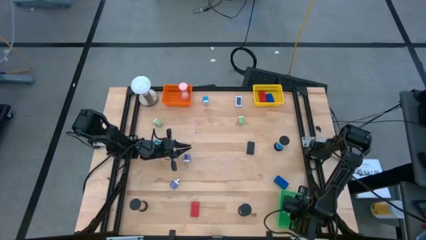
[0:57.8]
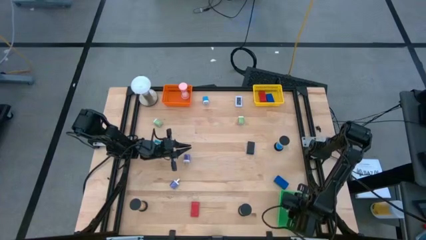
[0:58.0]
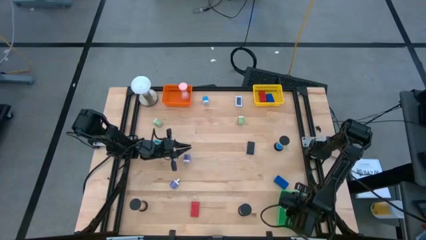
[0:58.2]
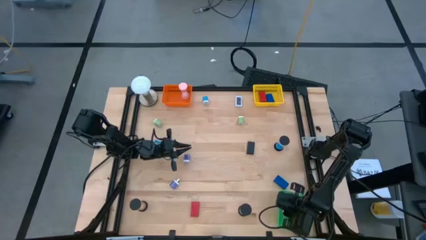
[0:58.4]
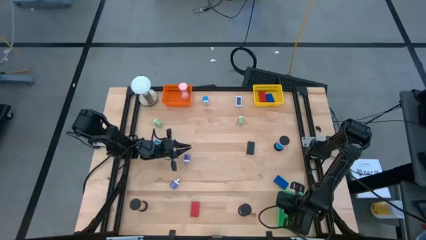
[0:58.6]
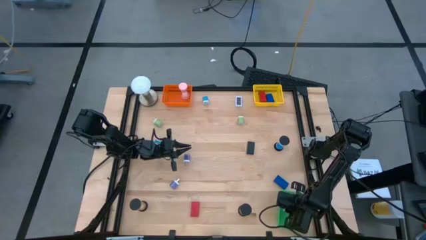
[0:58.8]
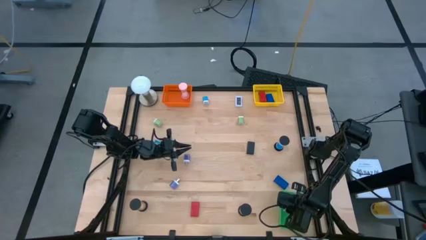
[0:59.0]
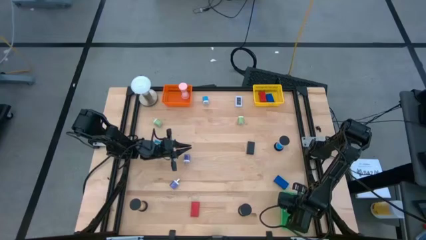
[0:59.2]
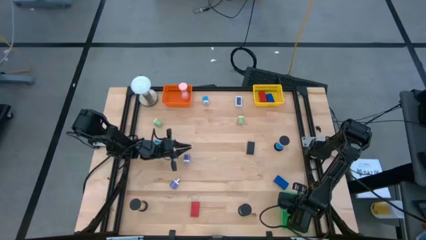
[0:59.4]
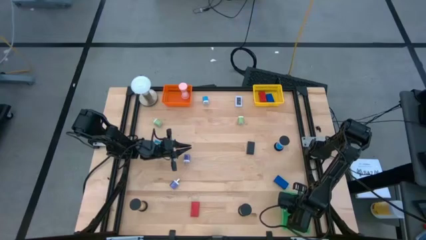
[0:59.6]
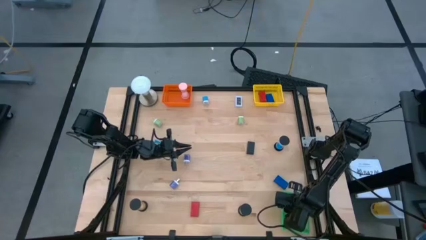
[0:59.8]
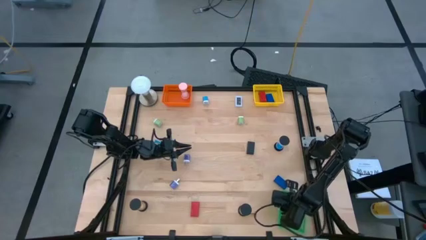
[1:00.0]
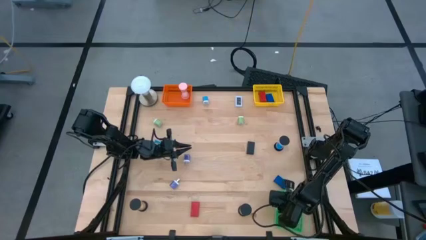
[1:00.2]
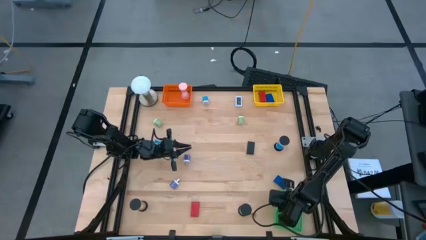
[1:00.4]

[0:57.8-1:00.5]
Task: Pick & Place Office items
Adjust the green bin

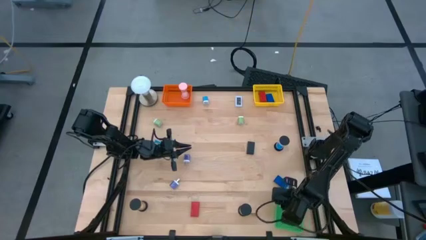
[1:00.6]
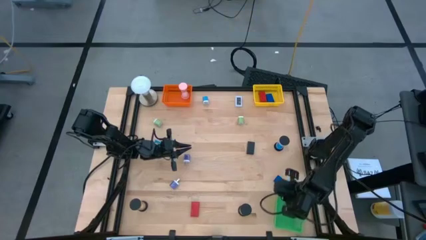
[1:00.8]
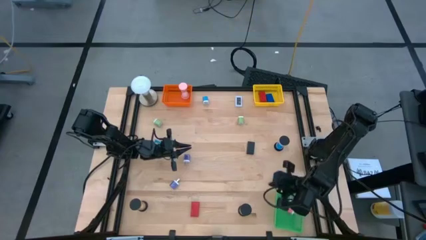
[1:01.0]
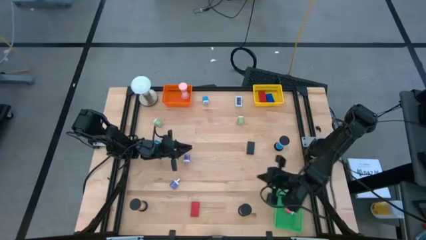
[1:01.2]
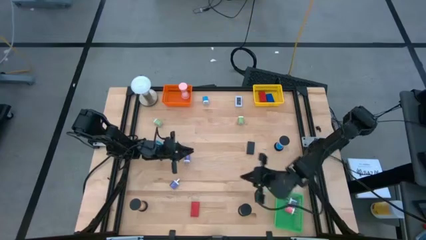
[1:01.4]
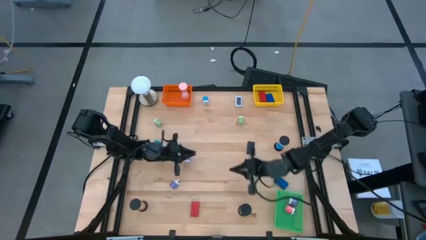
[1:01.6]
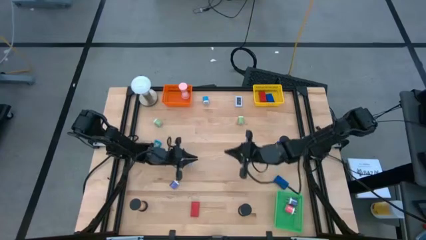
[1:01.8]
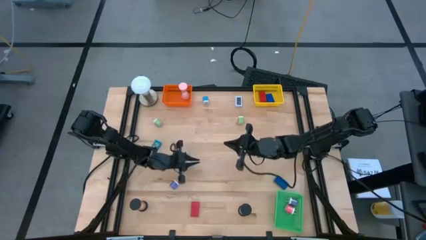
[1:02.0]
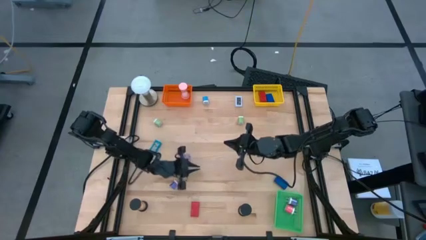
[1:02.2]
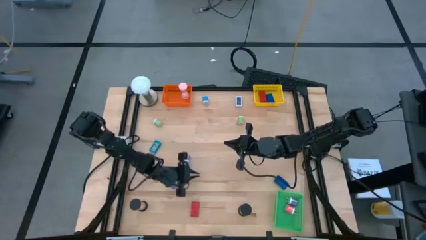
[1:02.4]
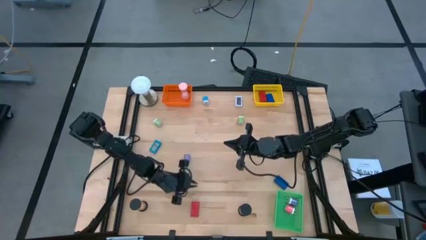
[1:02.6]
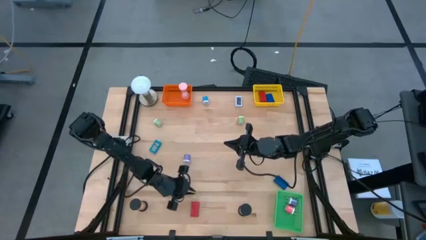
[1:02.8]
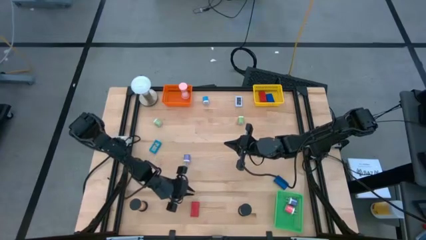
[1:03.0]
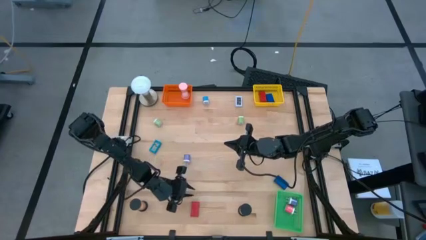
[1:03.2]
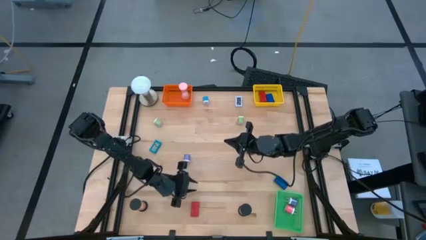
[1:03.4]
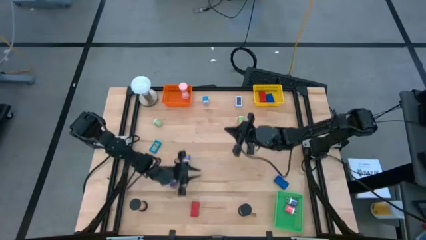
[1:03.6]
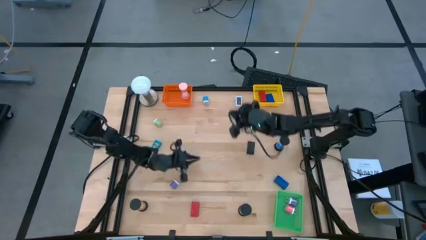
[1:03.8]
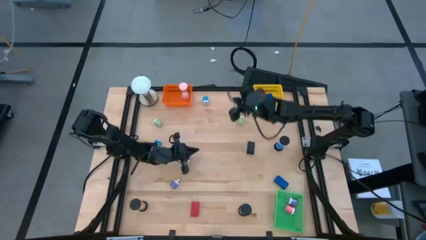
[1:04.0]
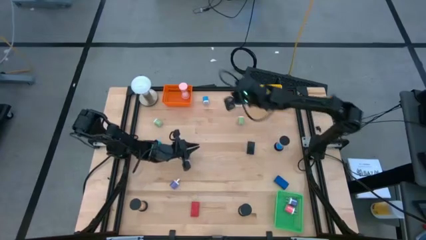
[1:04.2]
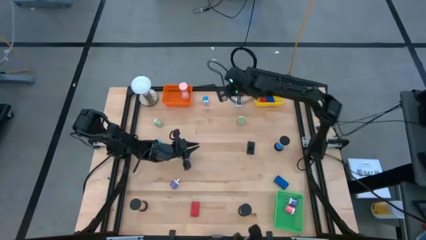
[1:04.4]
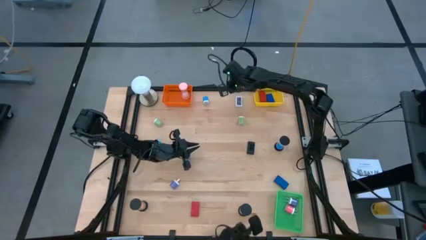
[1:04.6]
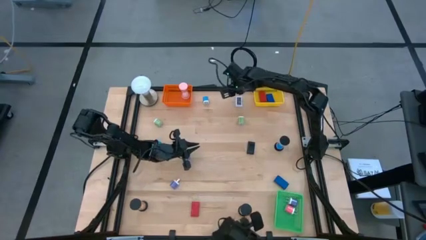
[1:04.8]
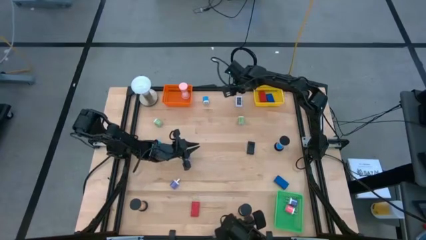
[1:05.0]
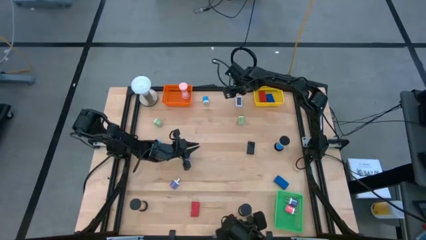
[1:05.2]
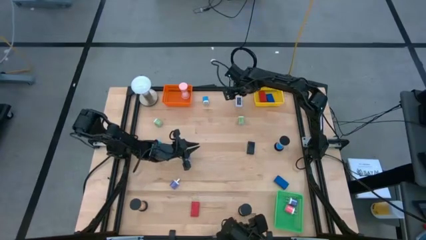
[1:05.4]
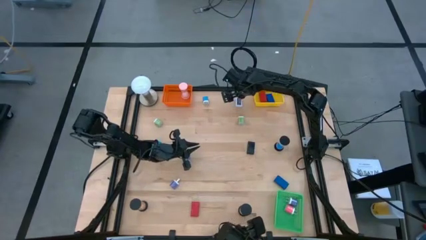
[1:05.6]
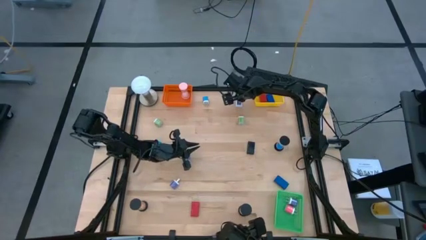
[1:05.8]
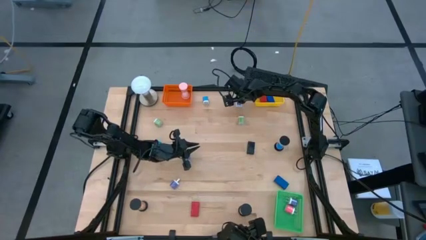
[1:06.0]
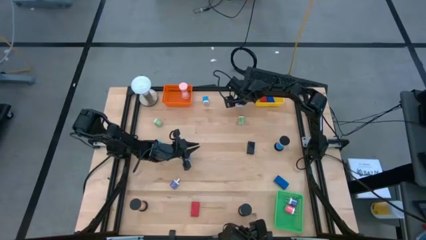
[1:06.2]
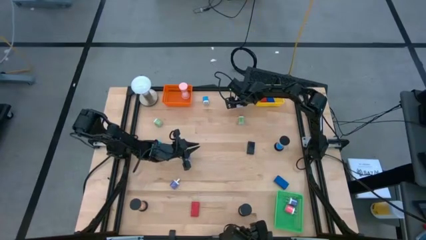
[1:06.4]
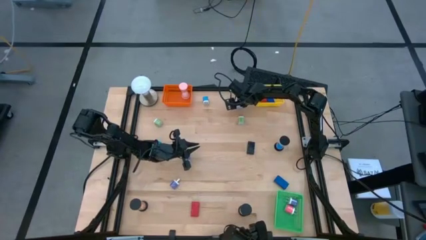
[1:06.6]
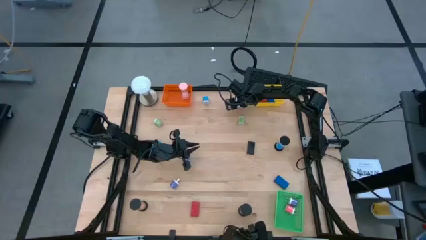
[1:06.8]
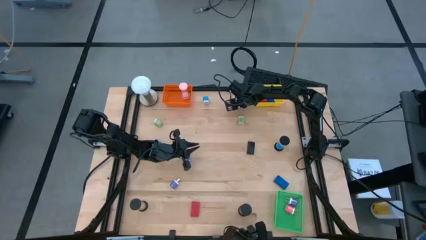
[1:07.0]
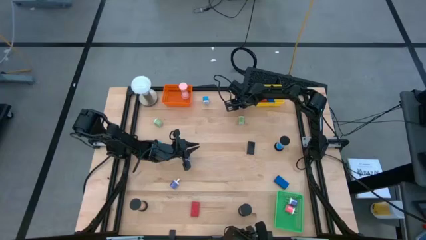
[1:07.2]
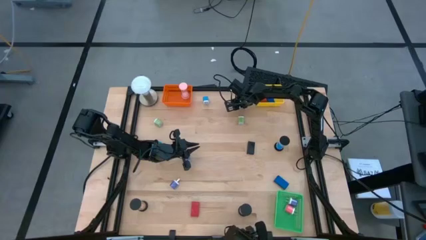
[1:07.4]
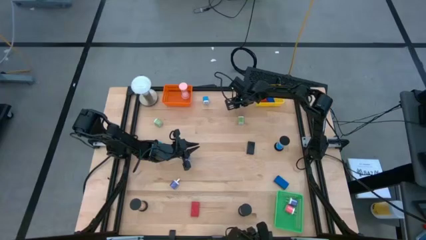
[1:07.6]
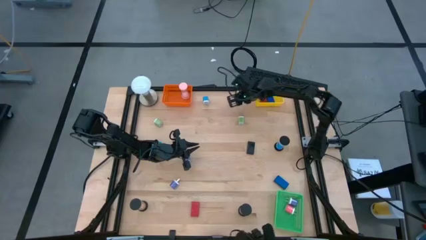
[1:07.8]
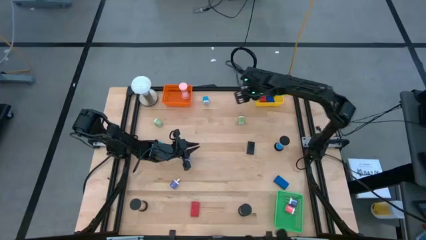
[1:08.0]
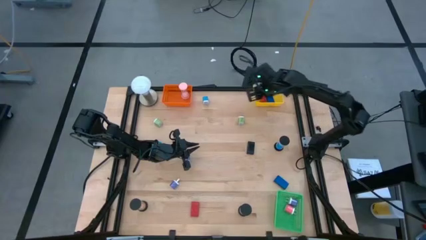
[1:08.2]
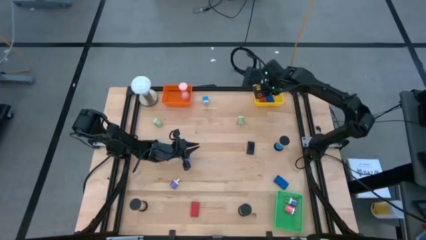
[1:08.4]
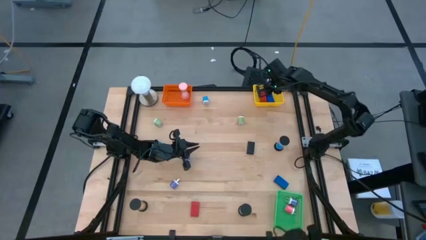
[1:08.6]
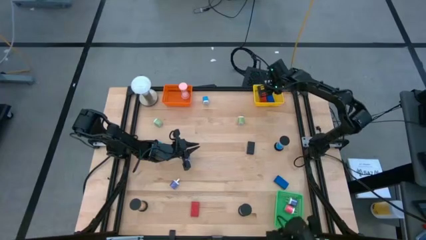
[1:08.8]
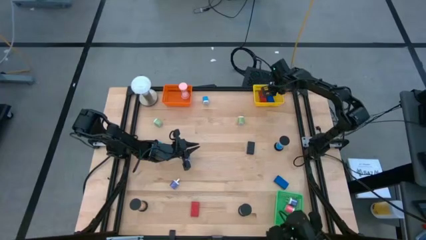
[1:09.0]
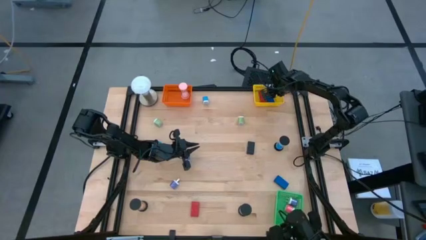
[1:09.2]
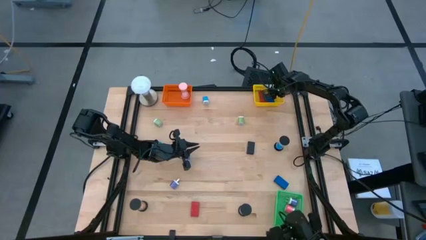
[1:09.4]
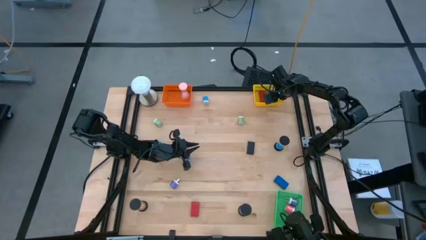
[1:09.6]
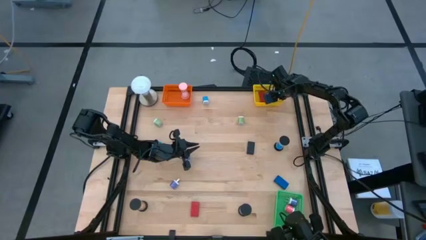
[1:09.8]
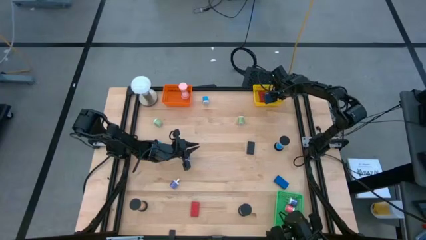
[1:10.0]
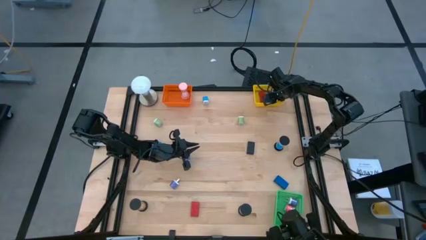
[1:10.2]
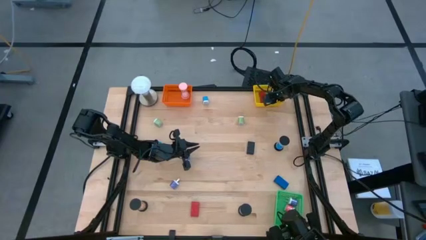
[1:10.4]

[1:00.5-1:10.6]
Put the white timer into the yellow basket

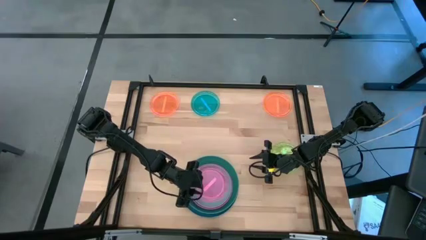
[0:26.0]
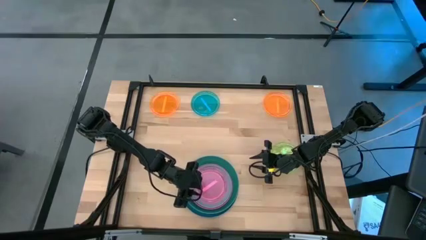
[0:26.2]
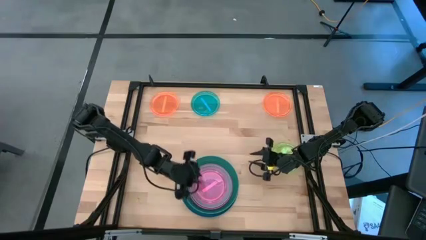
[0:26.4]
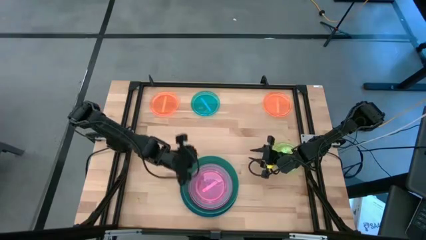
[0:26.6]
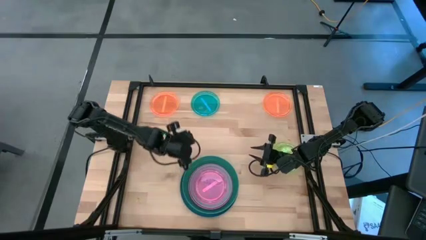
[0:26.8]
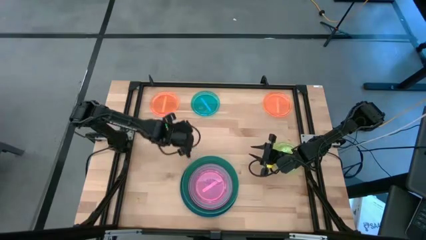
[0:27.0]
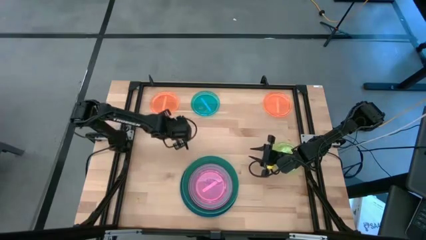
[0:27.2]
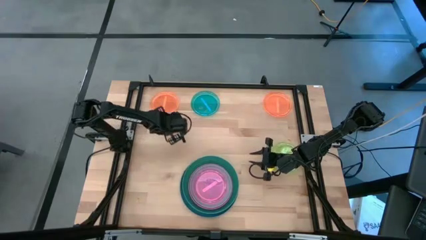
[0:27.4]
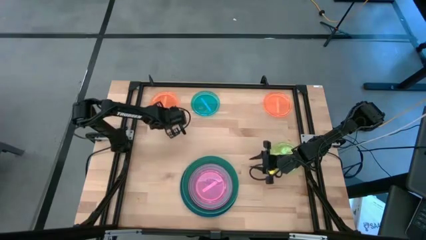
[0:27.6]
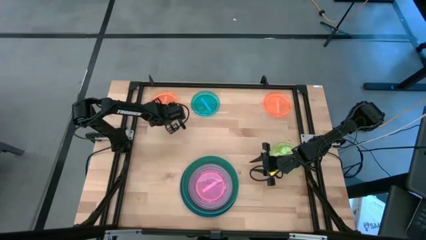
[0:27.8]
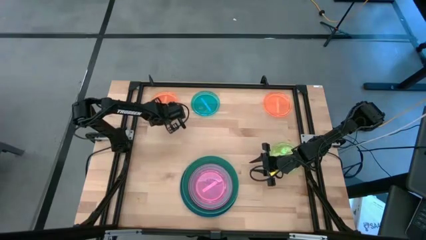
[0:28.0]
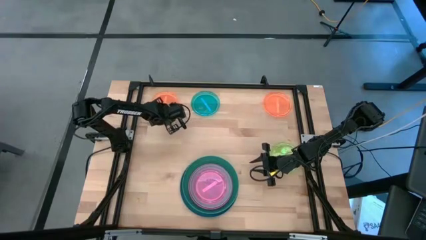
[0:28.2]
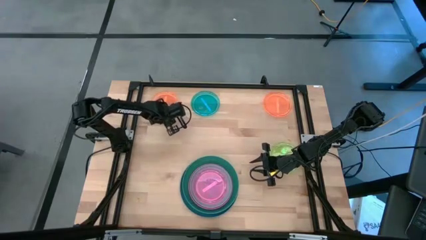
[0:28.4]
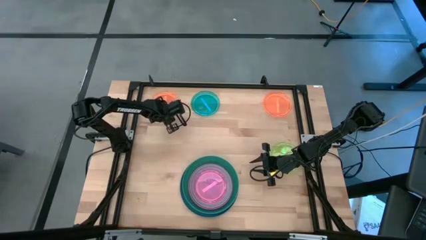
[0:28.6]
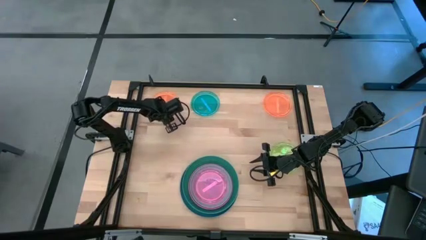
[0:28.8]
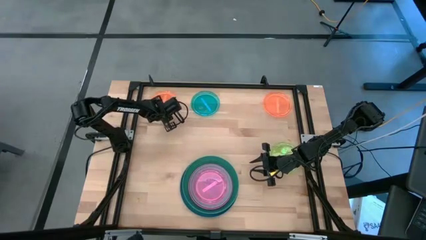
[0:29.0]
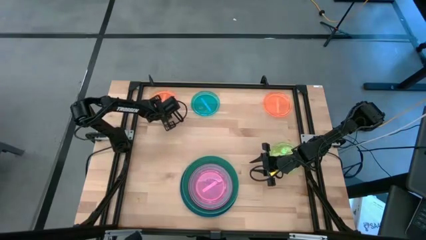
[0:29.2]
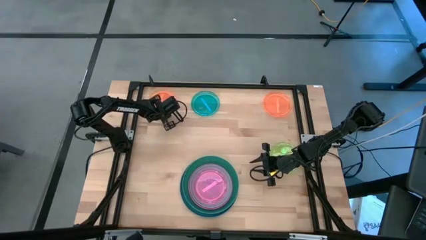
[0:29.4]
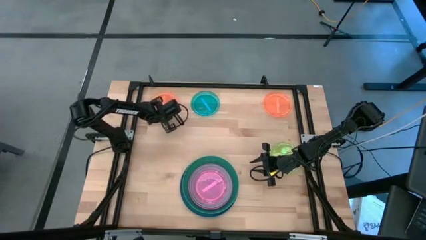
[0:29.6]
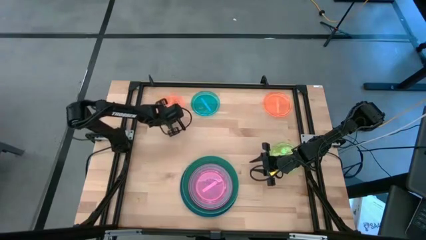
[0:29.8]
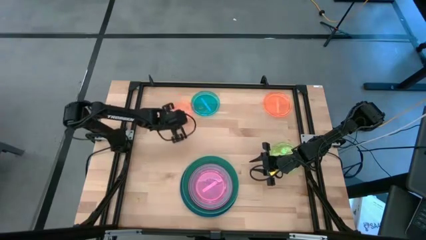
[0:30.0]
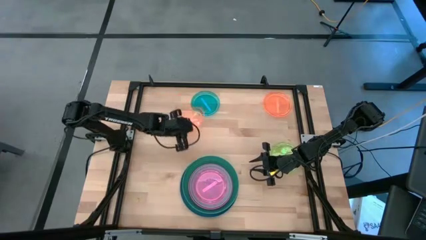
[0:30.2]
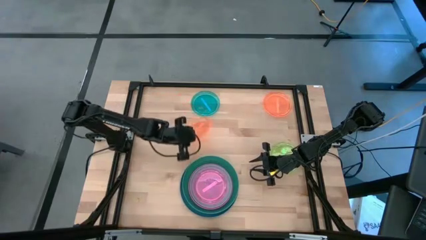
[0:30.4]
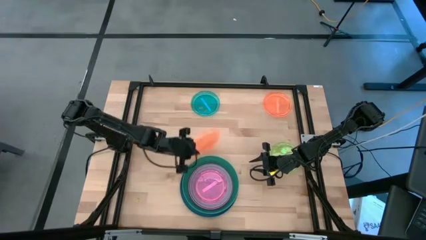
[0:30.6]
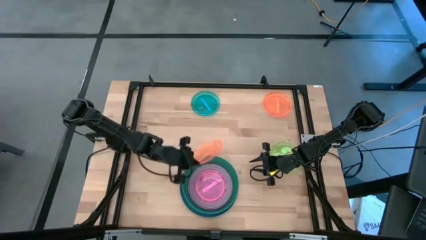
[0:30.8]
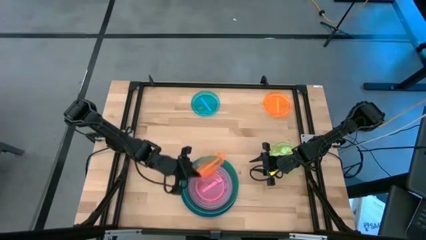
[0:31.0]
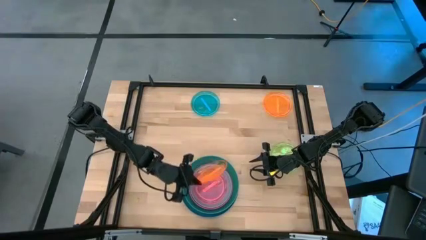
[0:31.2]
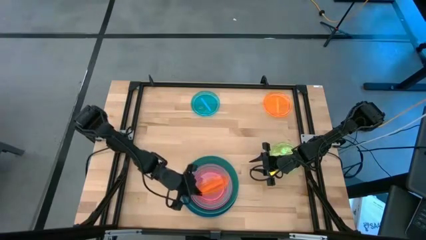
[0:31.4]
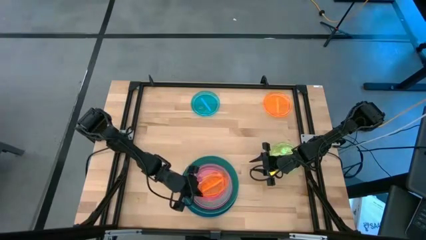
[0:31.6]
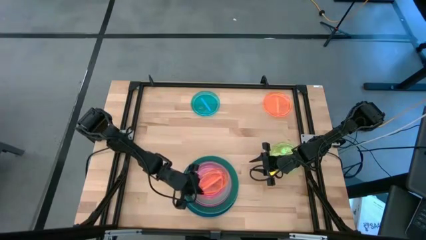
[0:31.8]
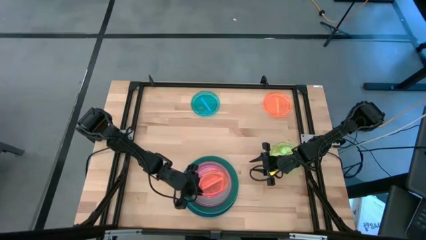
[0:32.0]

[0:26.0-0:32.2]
Task: Stack plastic plates
Stack the left orange plate on the light pink plate
